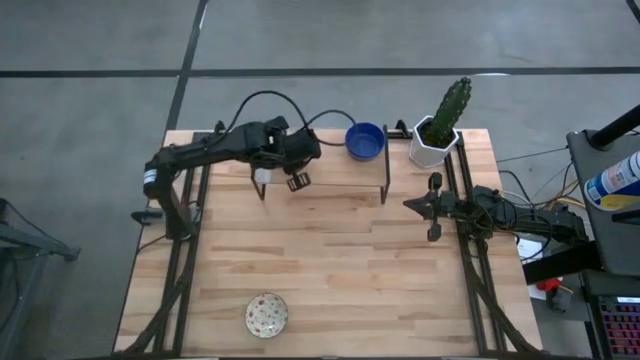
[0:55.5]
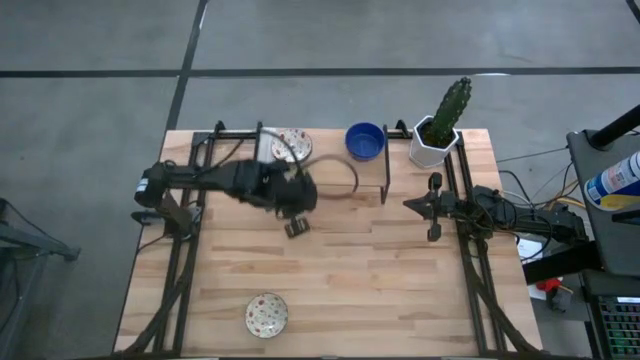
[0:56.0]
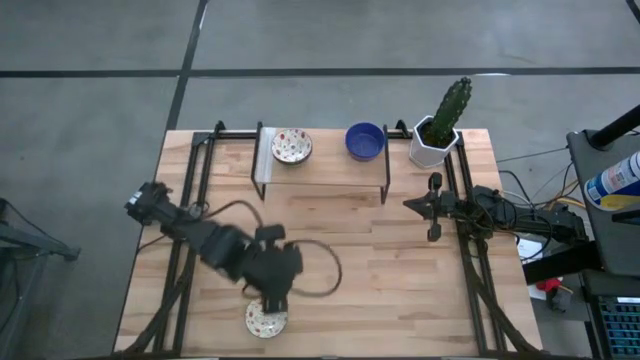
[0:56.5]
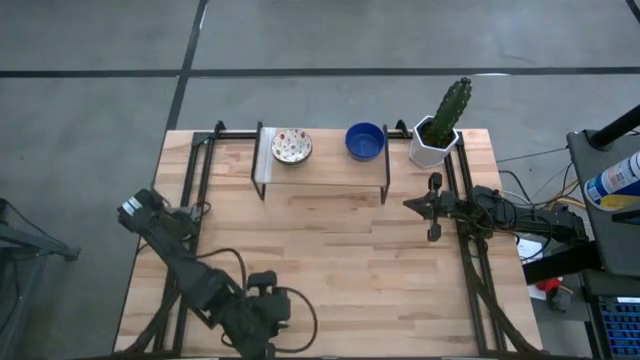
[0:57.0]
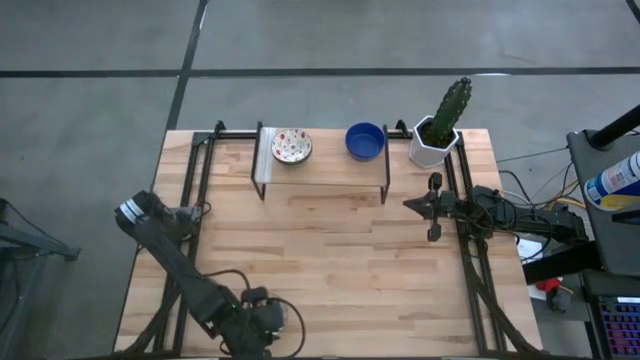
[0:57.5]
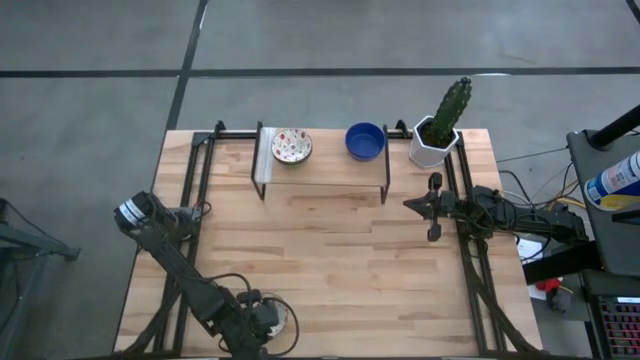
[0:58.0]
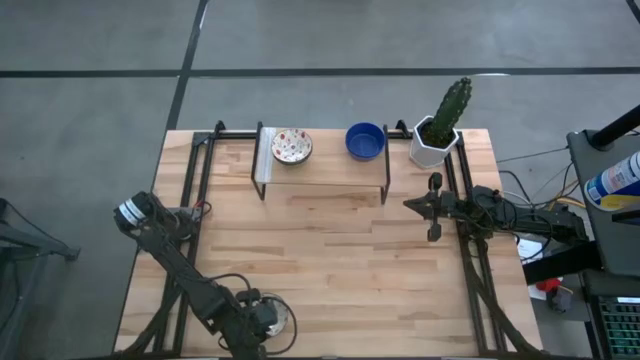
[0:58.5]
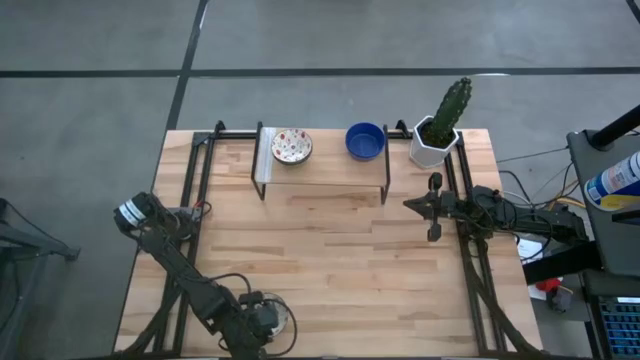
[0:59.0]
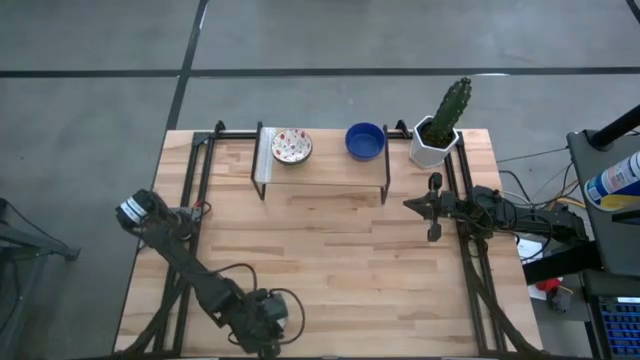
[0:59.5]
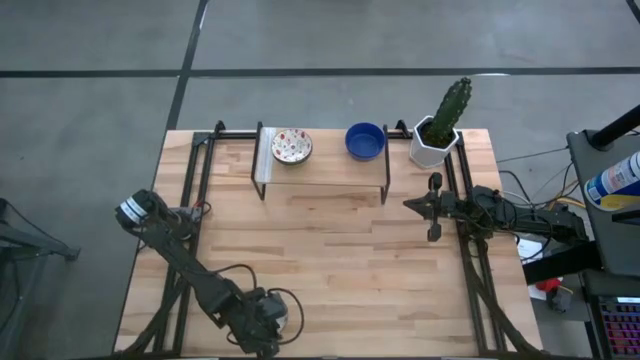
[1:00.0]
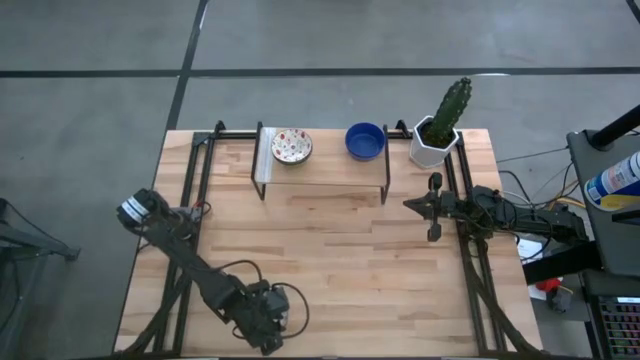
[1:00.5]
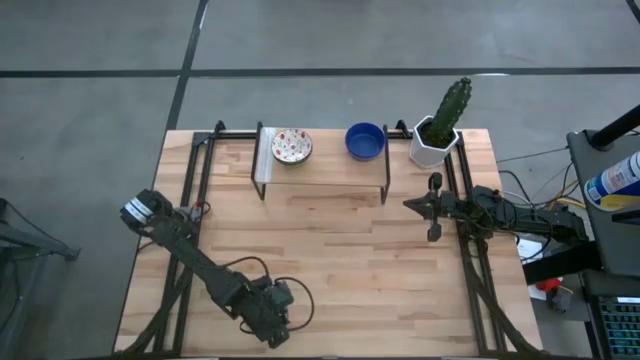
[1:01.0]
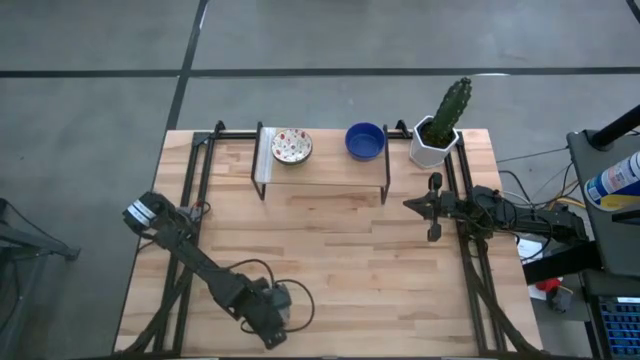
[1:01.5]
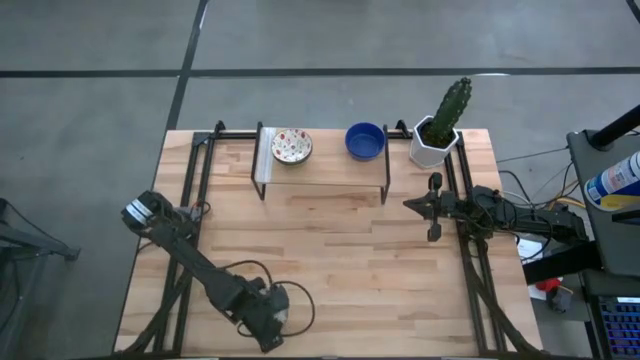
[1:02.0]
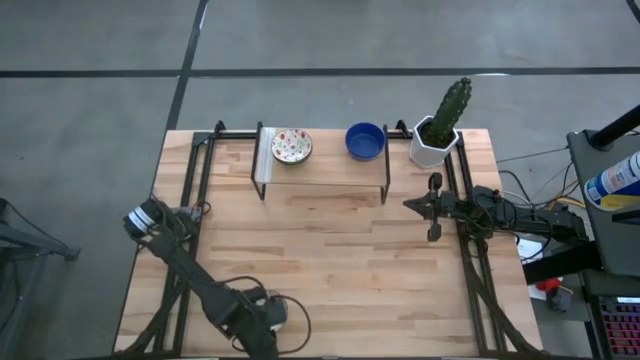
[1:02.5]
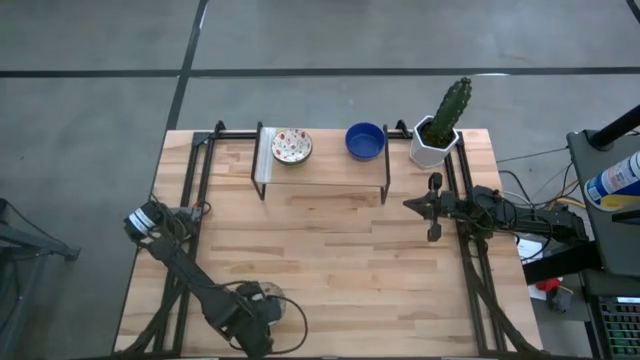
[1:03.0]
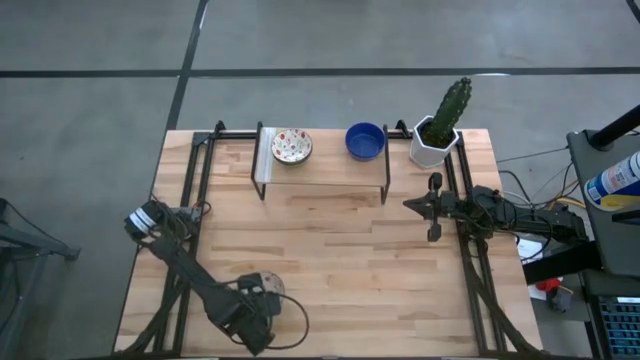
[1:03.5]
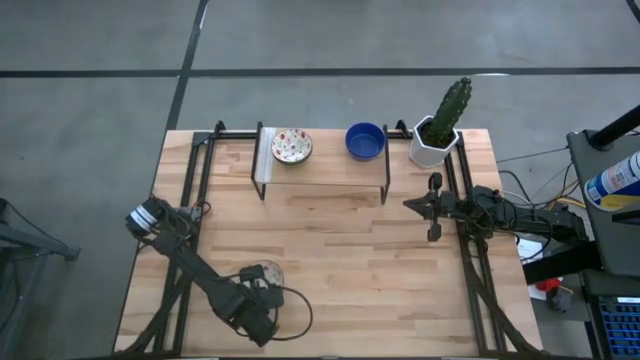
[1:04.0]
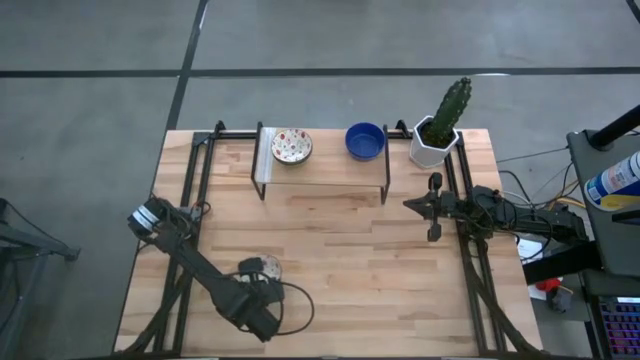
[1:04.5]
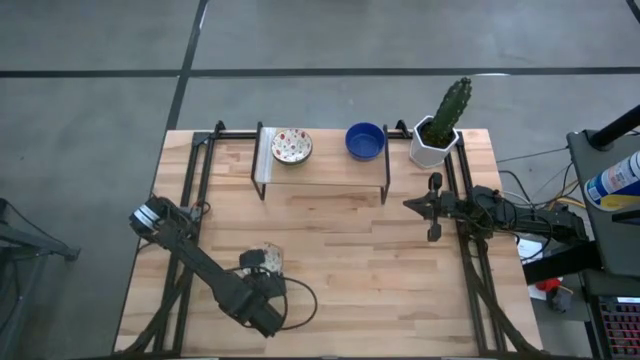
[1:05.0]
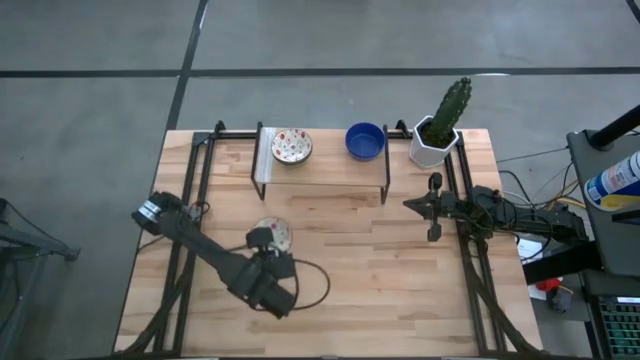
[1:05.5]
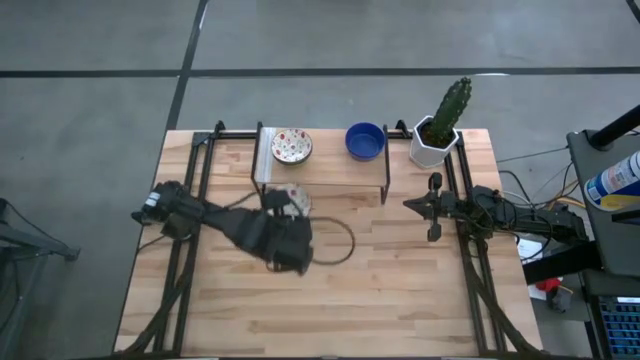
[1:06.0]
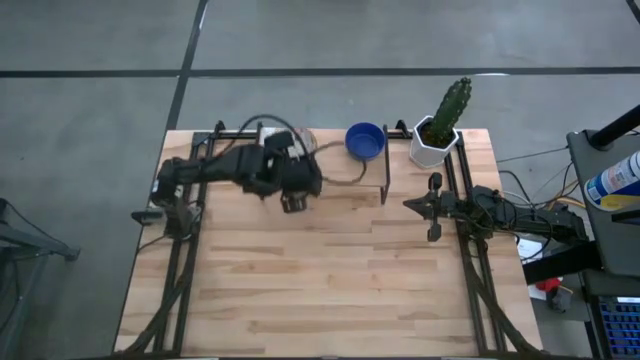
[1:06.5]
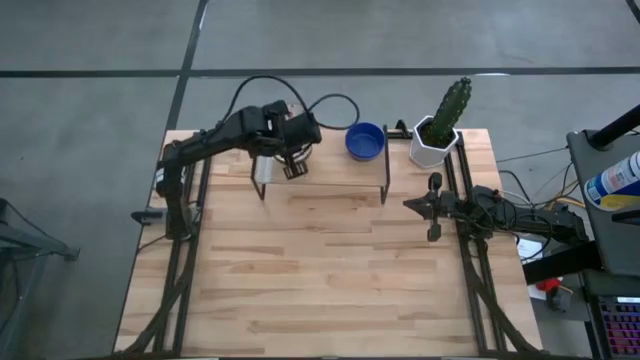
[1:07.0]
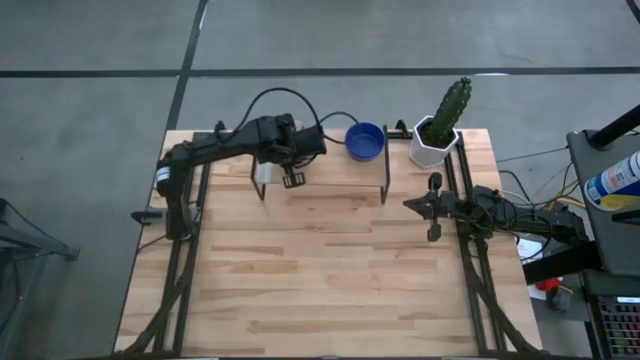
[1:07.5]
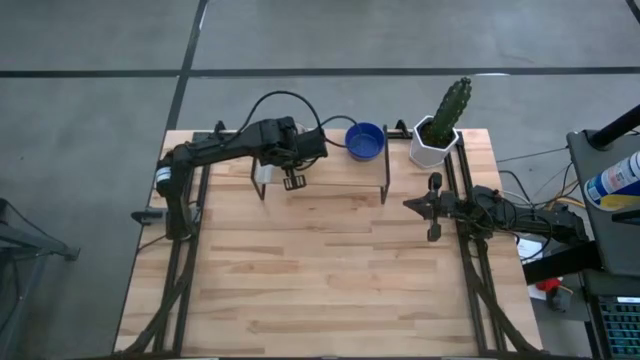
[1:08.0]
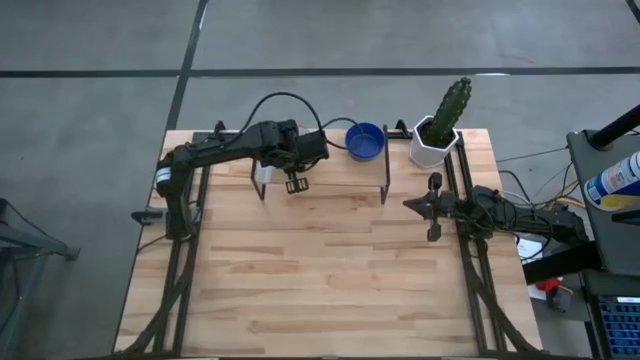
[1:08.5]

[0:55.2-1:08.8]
Task: Pick & Place Mini bowls
Stack the white bowl on top of the white bowl on the shelf

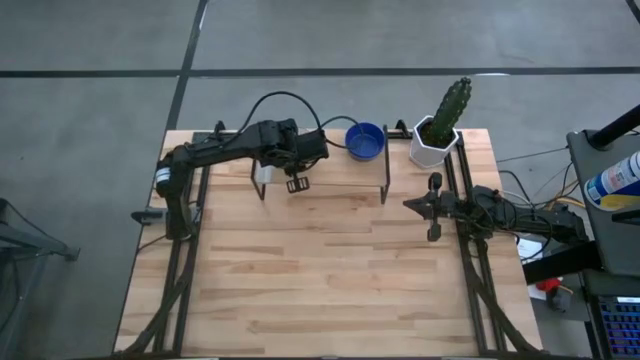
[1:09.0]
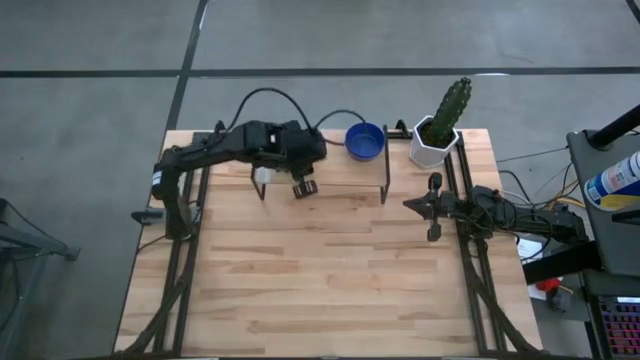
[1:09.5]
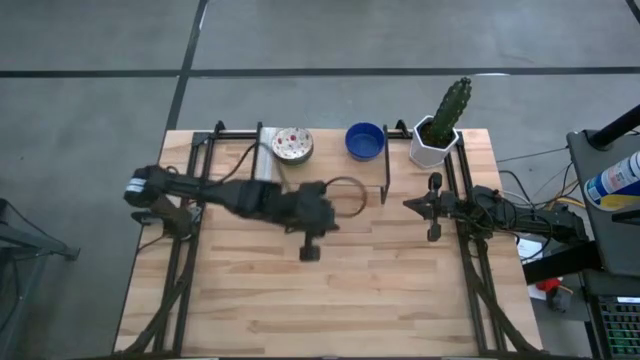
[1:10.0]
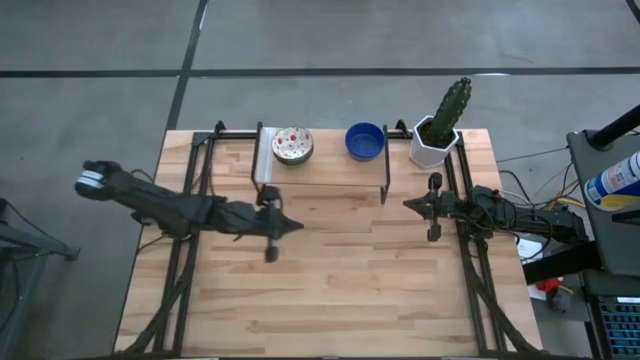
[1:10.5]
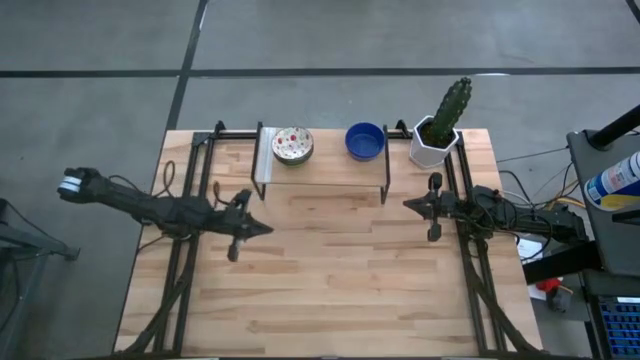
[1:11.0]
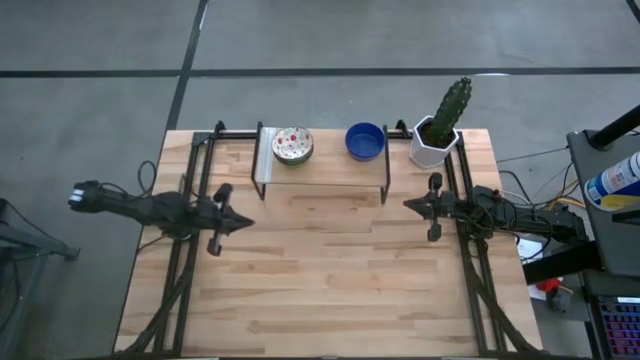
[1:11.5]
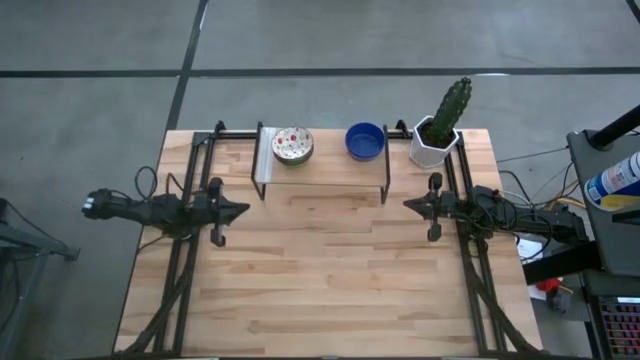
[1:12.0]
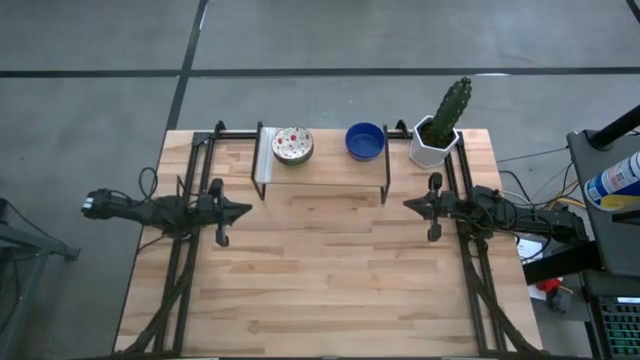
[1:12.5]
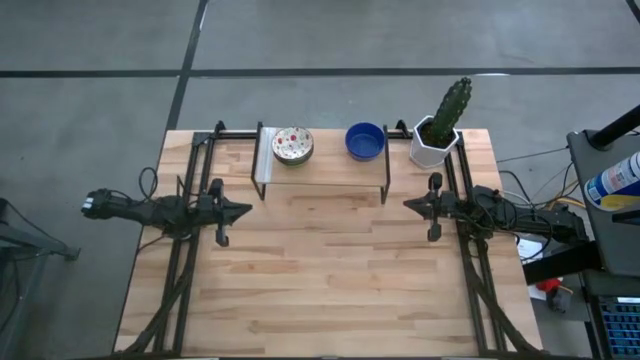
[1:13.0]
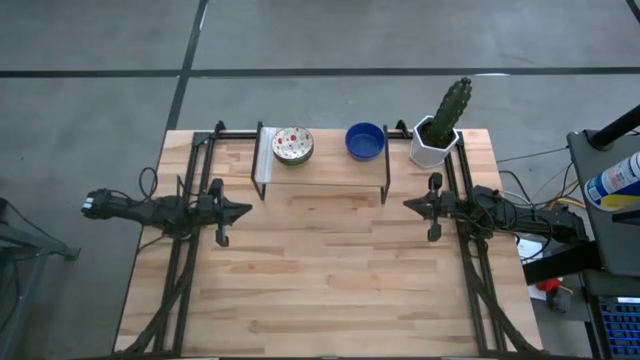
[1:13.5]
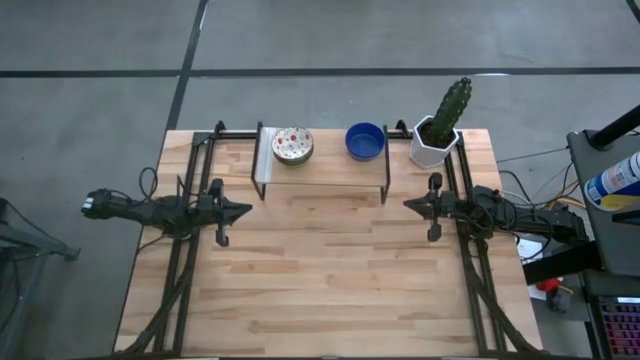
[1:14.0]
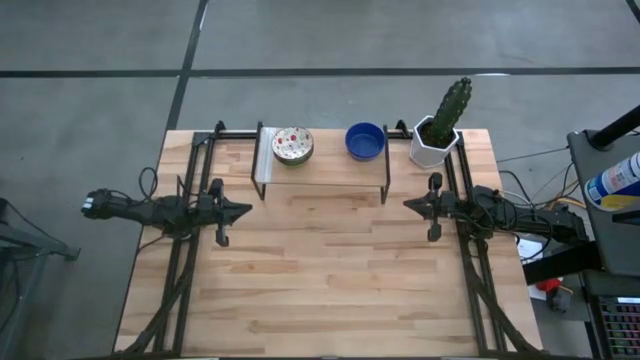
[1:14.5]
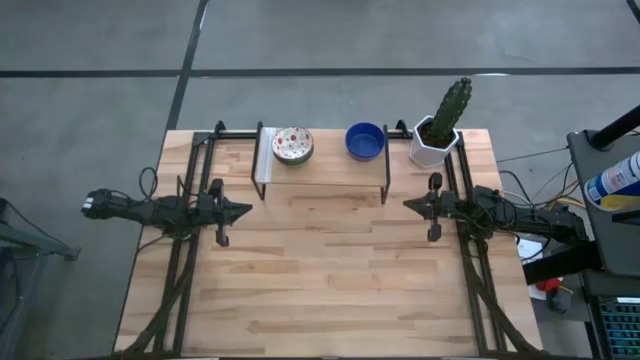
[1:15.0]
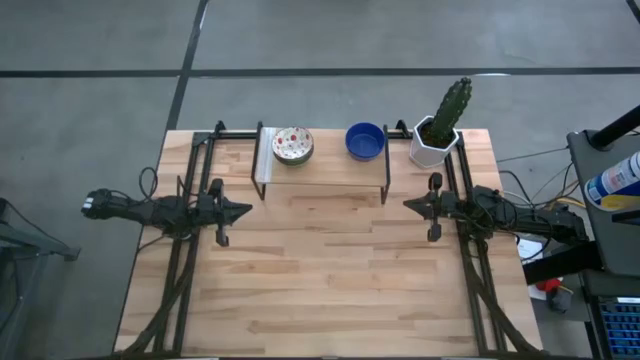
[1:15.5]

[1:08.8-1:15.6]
Return to Home Position
